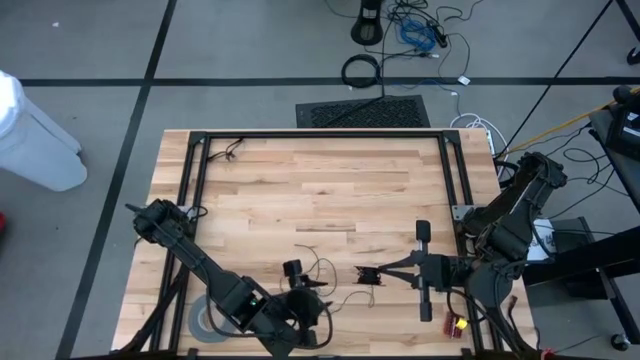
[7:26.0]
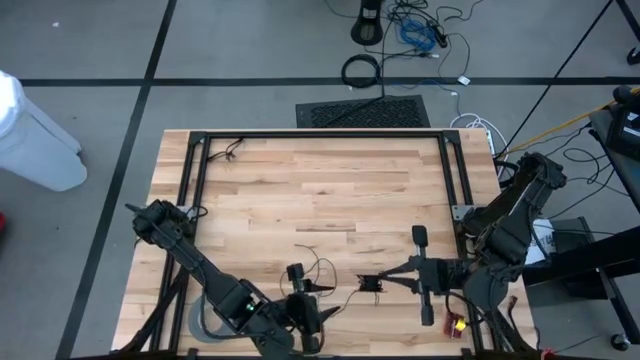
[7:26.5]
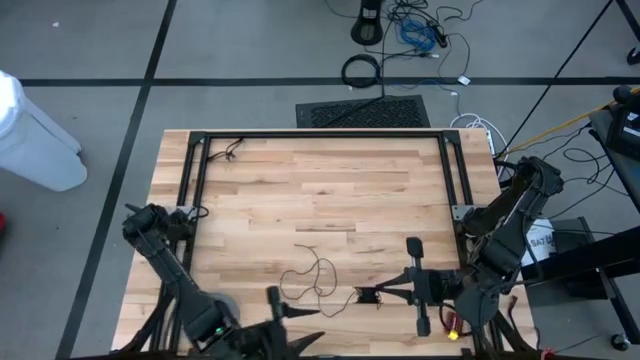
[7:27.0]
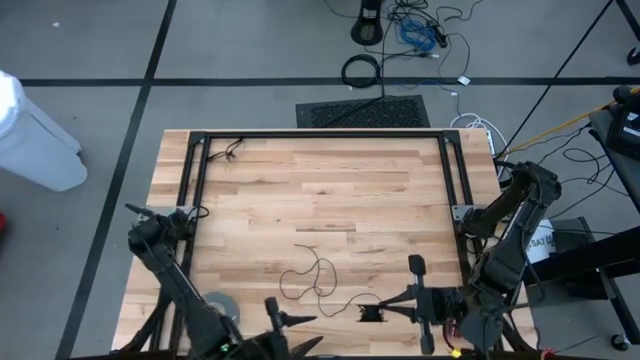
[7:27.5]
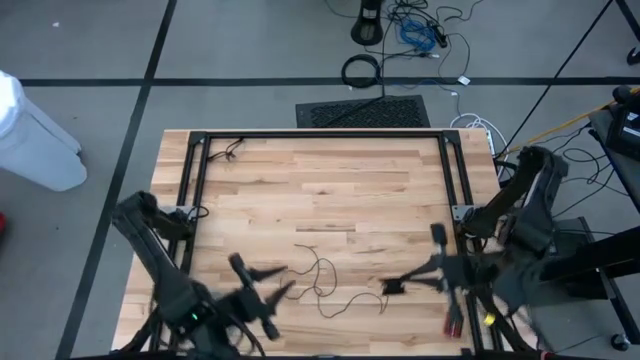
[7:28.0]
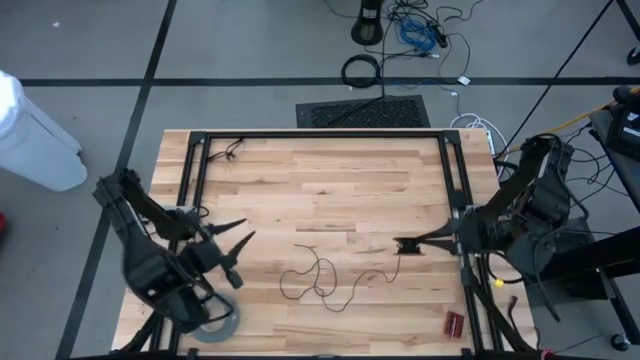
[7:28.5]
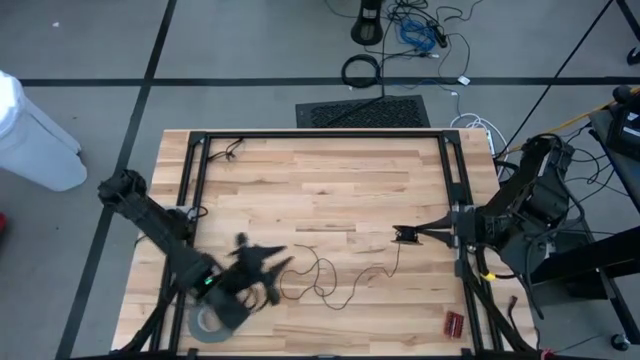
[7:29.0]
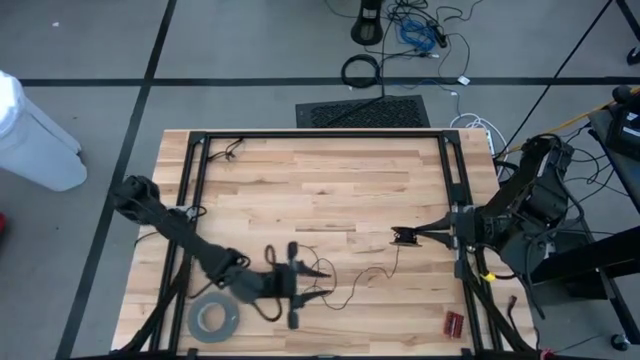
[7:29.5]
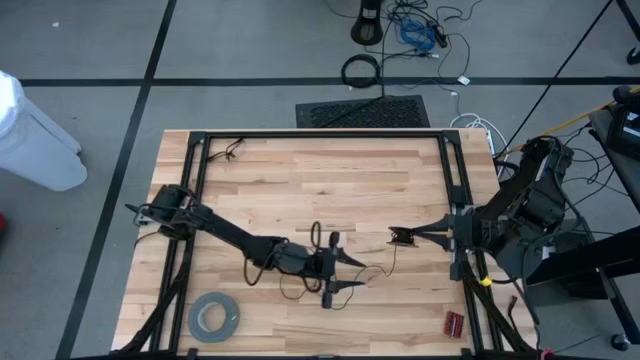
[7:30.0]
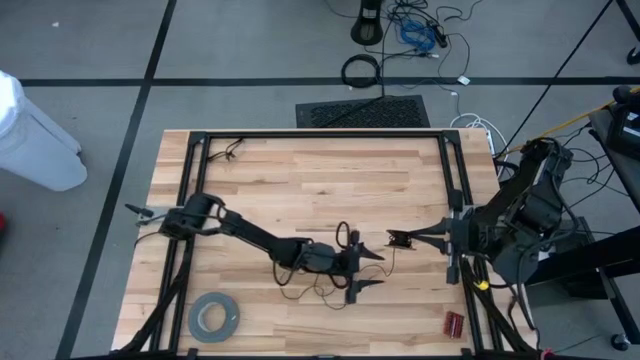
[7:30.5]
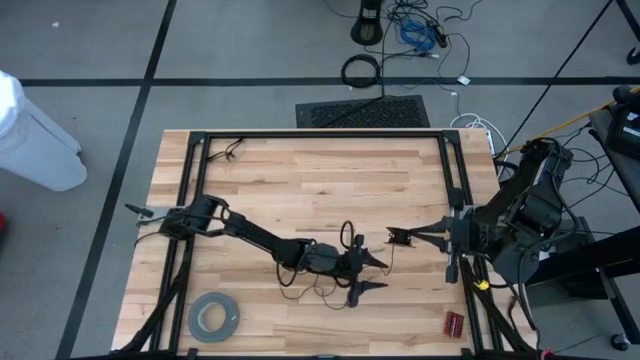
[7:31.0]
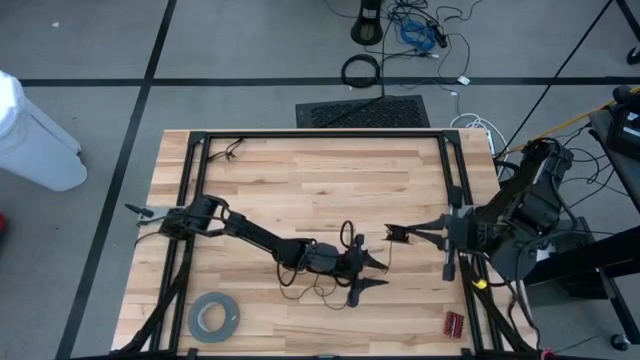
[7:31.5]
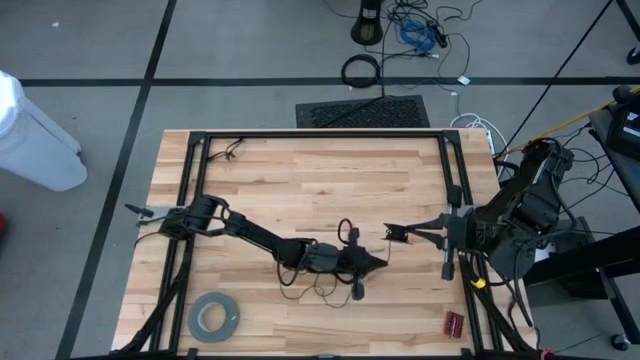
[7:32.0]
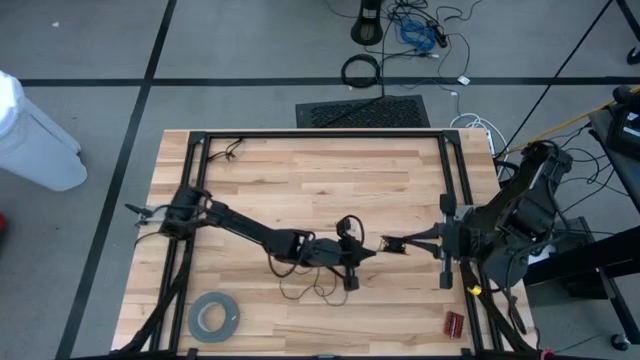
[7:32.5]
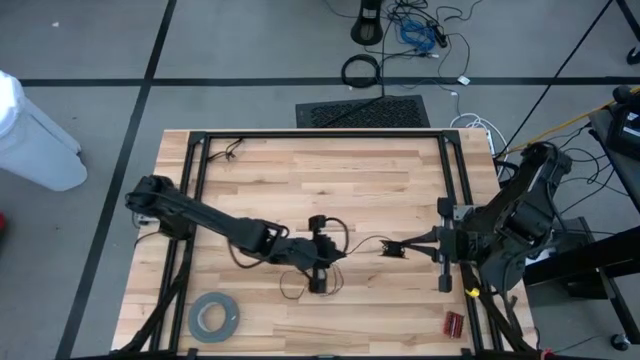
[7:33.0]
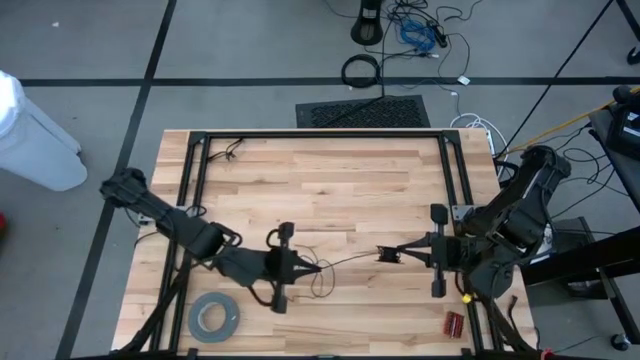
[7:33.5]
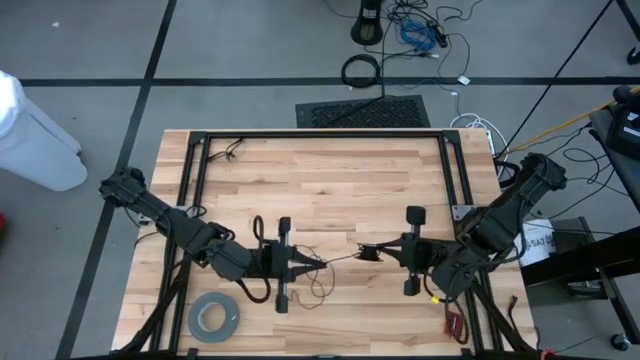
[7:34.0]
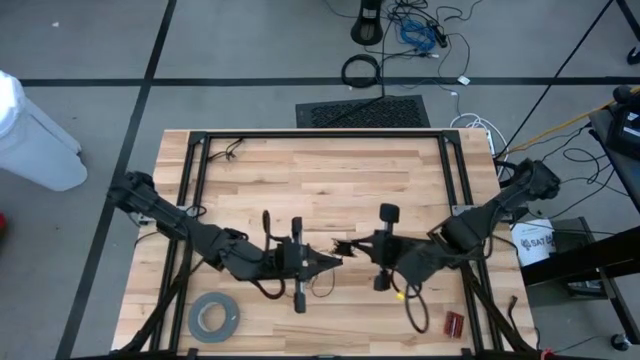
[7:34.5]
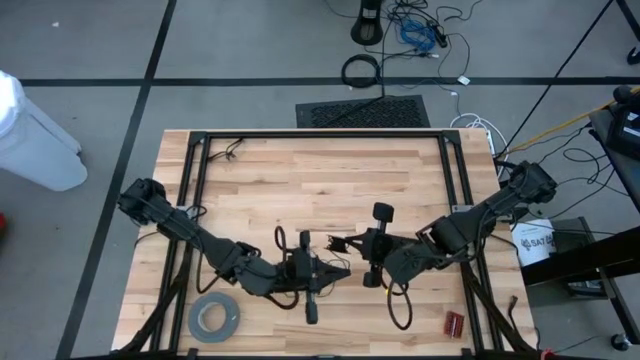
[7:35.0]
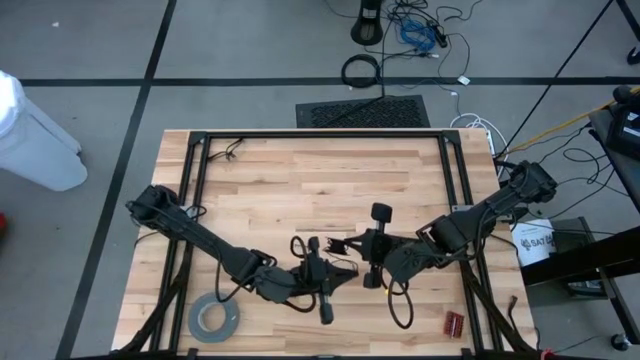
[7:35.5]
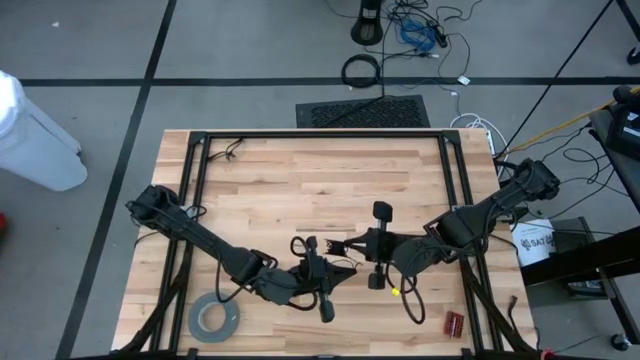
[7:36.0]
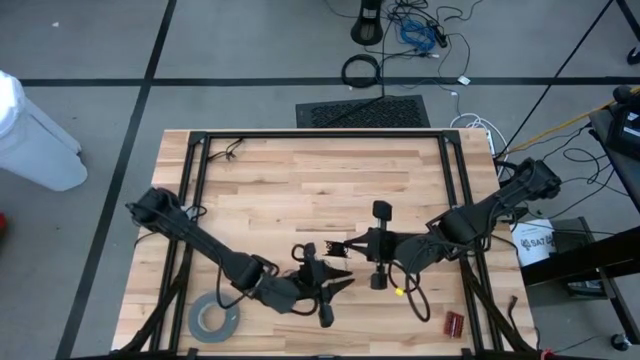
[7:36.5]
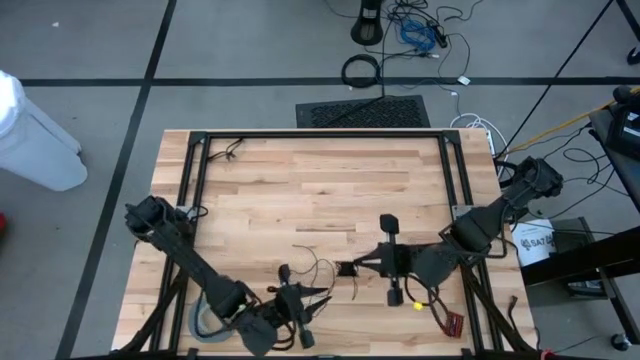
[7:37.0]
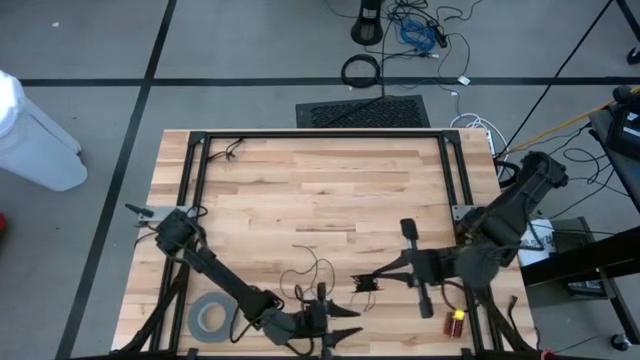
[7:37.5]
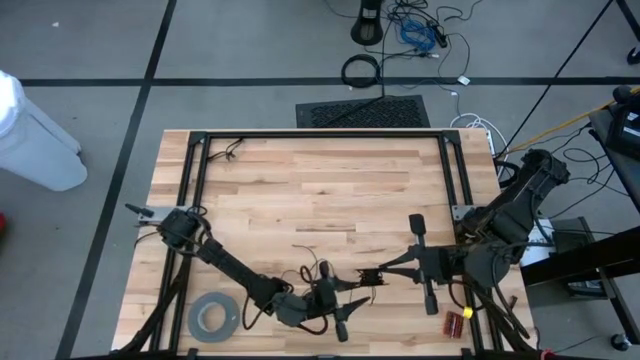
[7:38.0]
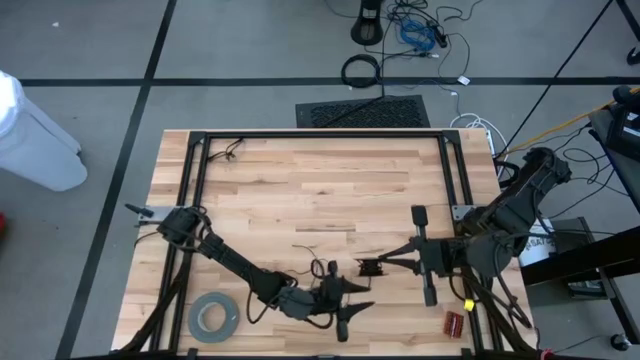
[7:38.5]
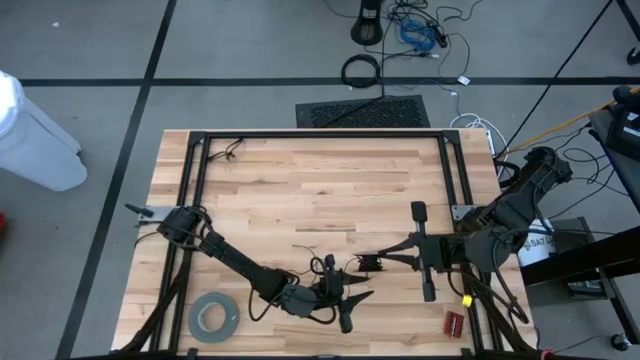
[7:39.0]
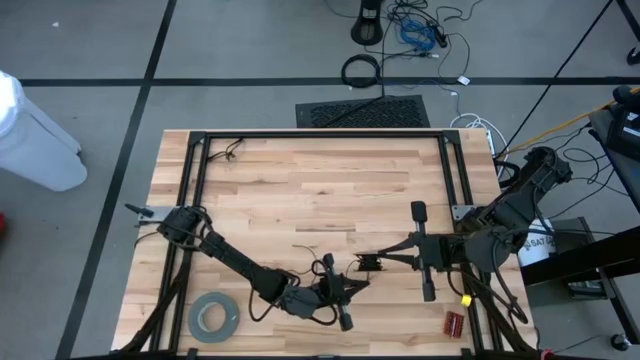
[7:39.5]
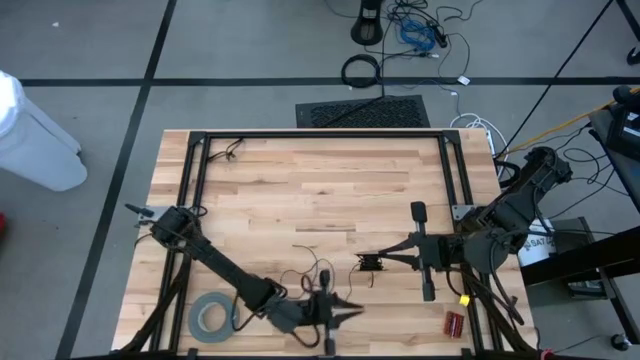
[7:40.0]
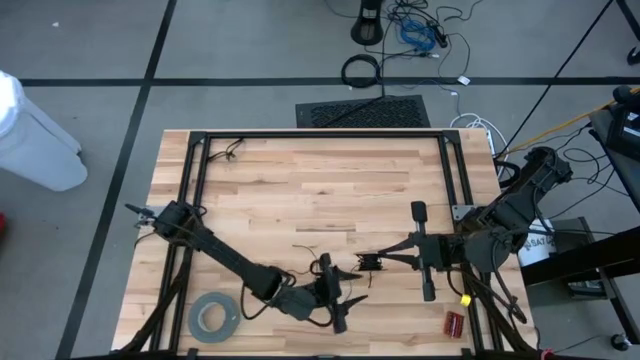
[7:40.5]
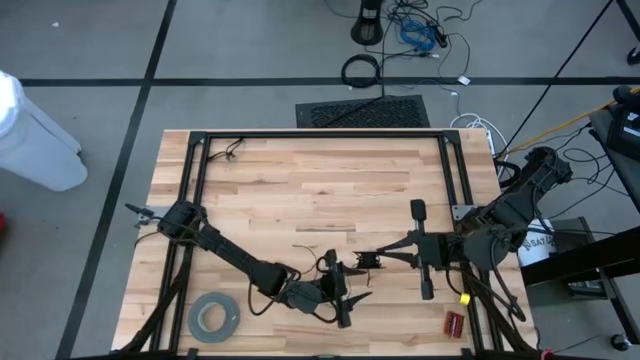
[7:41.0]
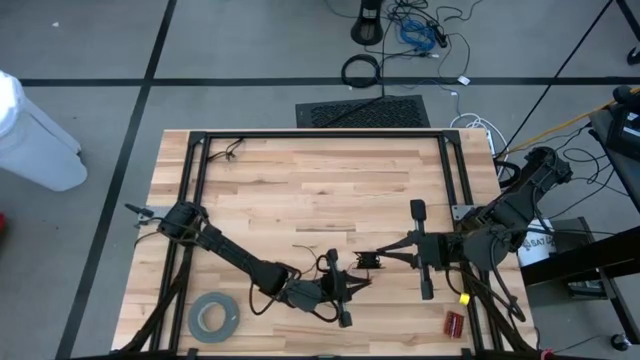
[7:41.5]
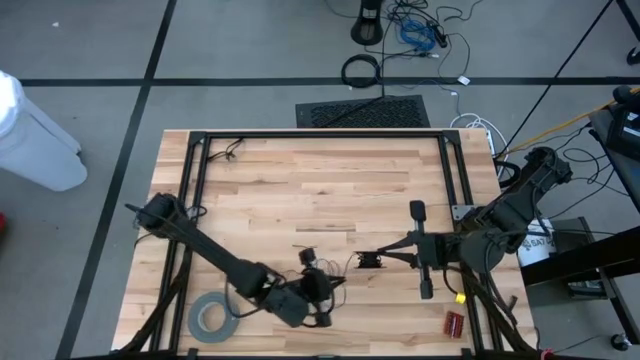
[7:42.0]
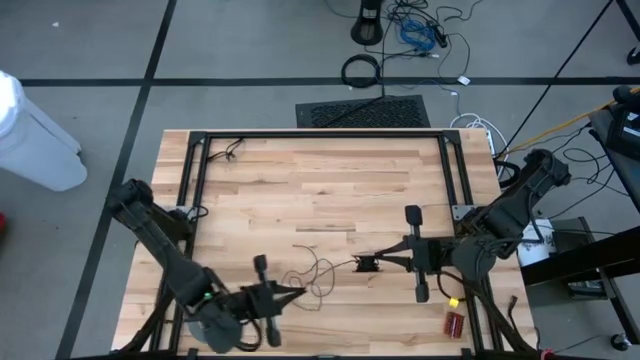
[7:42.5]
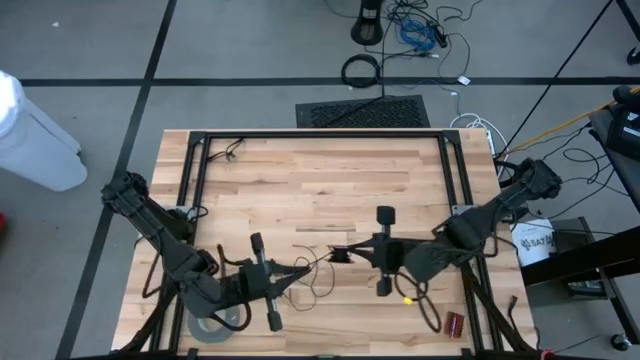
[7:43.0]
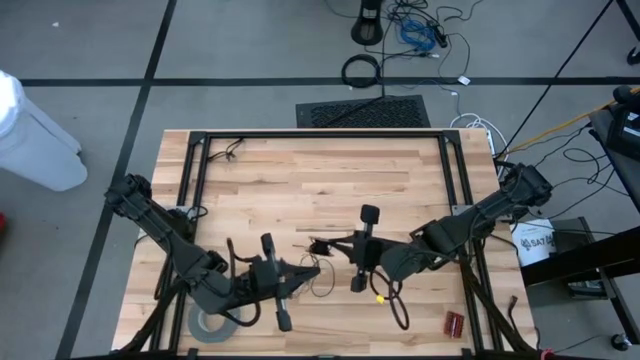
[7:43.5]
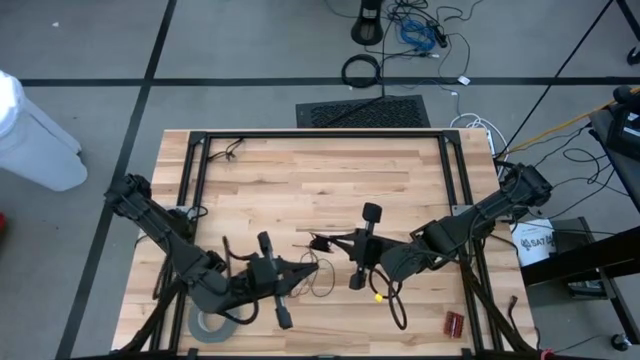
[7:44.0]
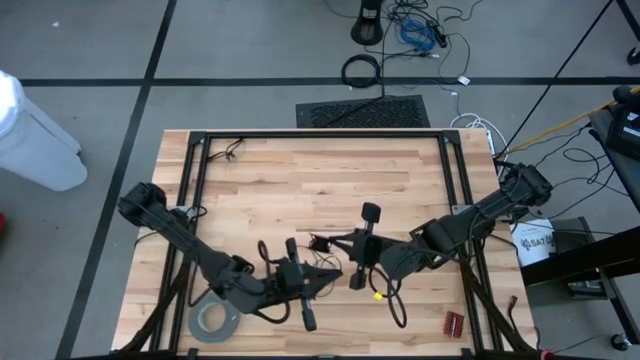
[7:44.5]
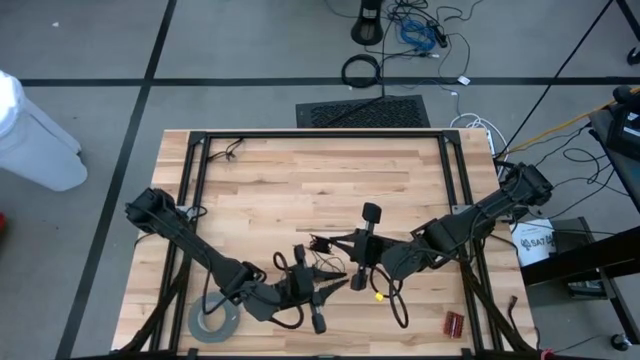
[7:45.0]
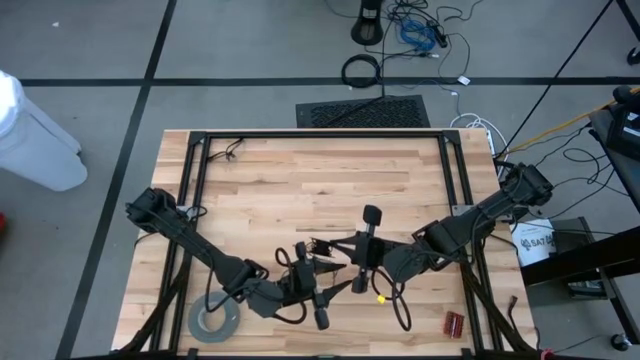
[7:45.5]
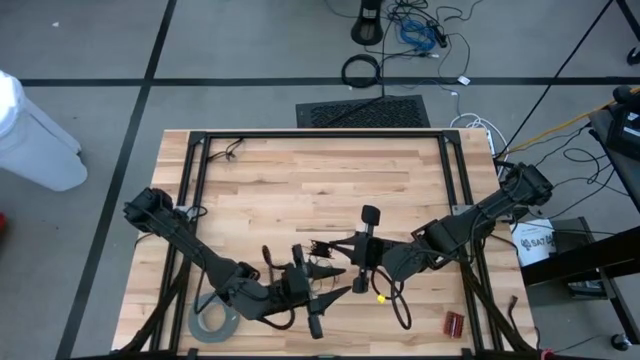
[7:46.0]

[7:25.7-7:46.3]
Task: Coil cords
Coil the black wire onto the spool
